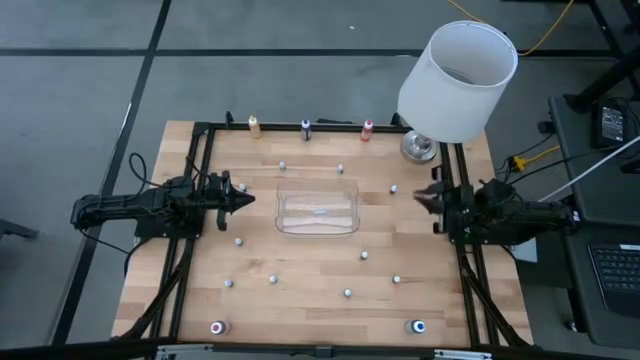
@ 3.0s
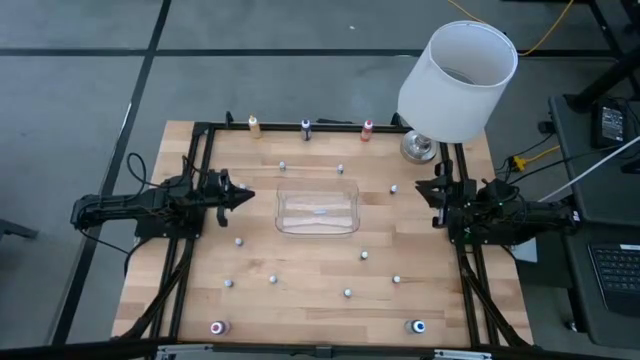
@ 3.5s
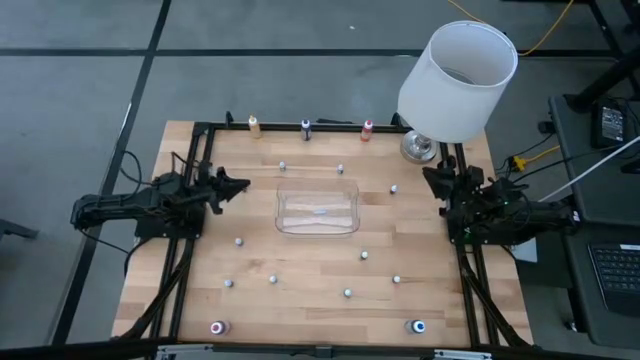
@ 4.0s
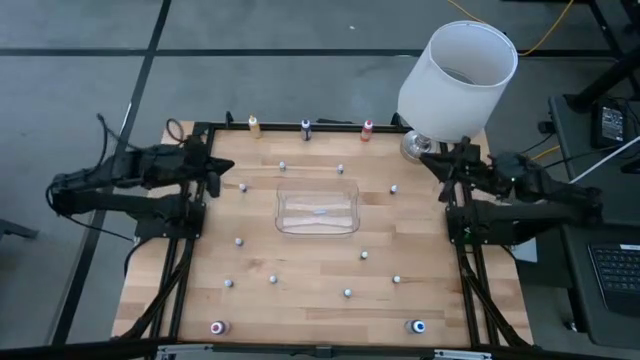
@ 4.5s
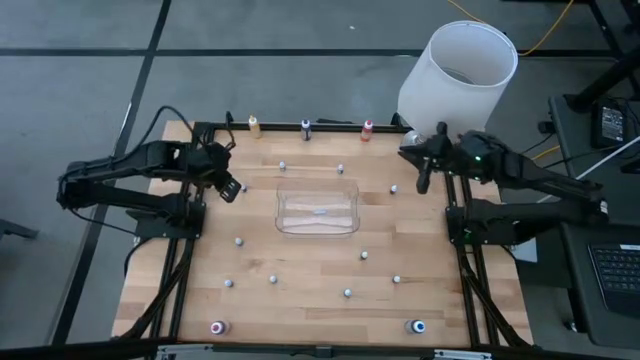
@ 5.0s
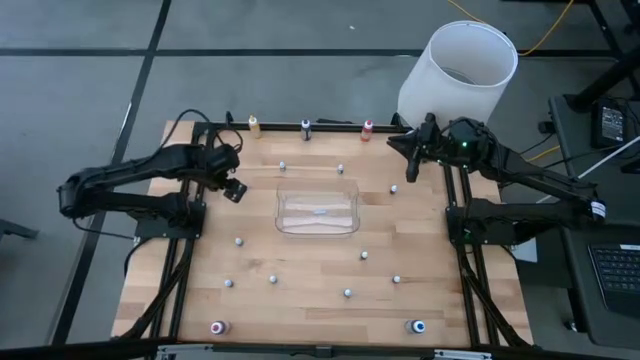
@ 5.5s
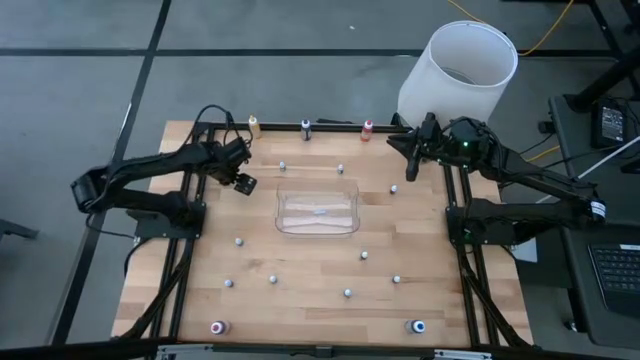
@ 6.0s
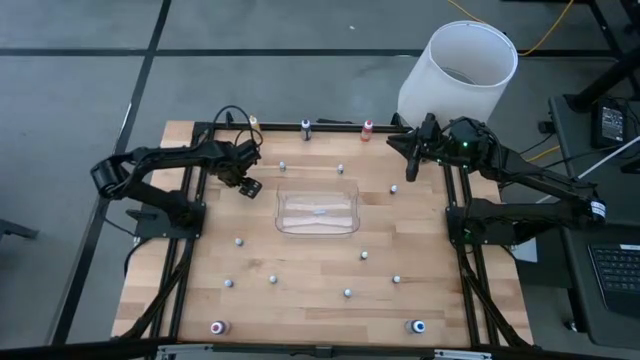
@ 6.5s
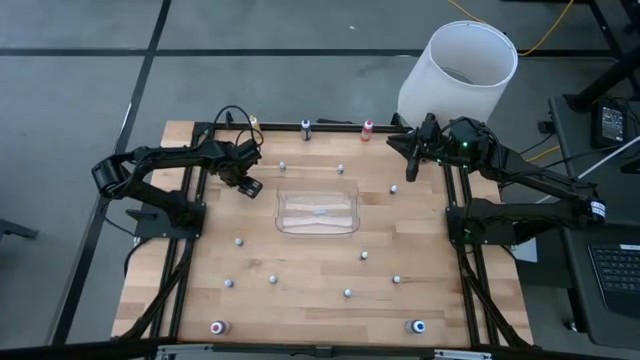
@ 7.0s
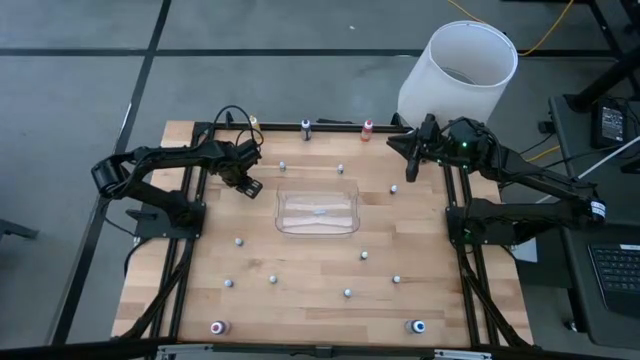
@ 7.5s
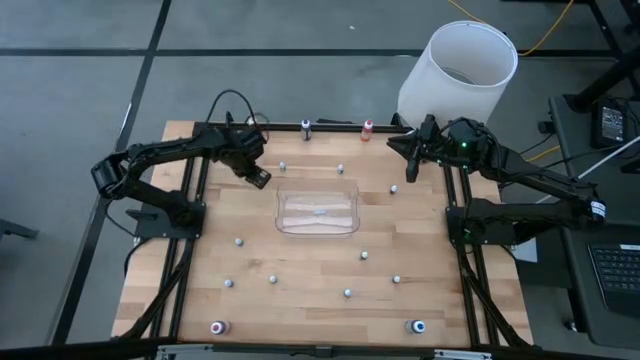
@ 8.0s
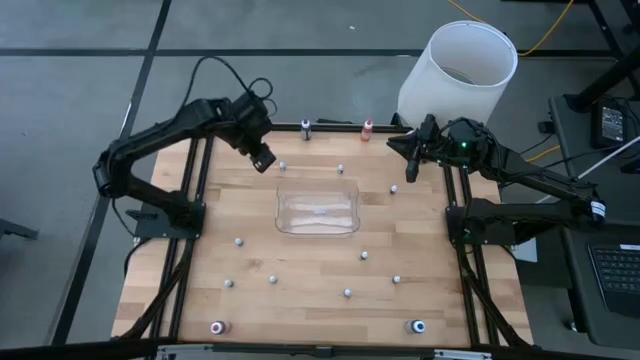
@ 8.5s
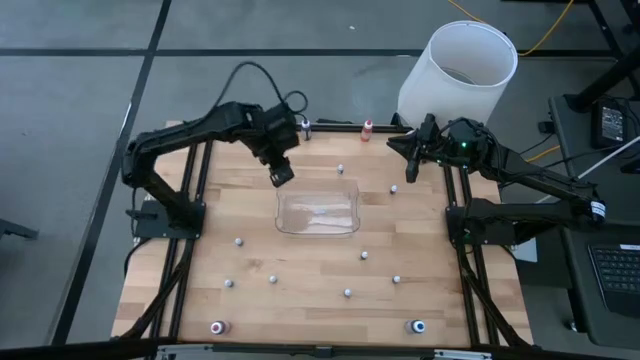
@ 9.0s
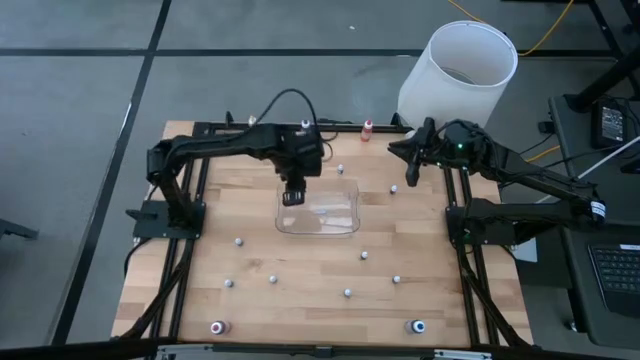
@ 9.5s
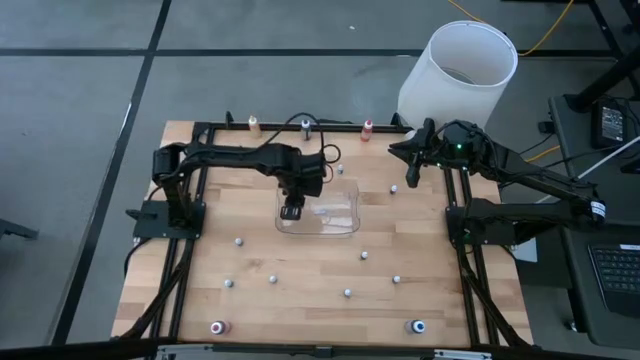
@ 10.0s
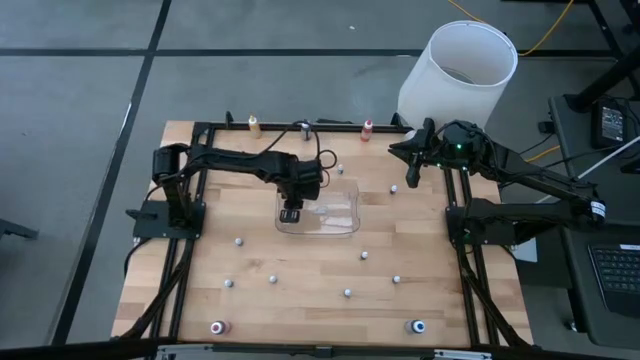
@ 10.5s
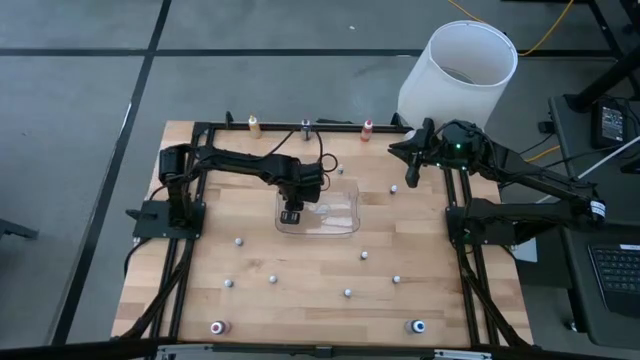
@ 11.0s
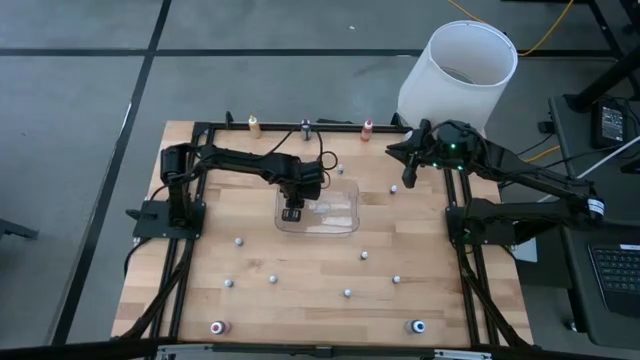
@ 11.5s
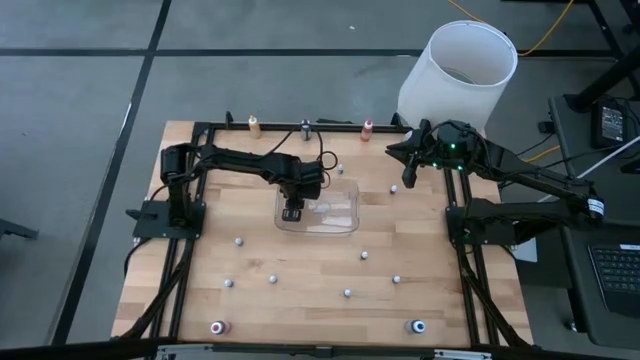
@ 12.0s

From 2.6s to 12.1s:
Task: Pick & Place food coloring
Put the pink food coloring bottle into the transparent bin

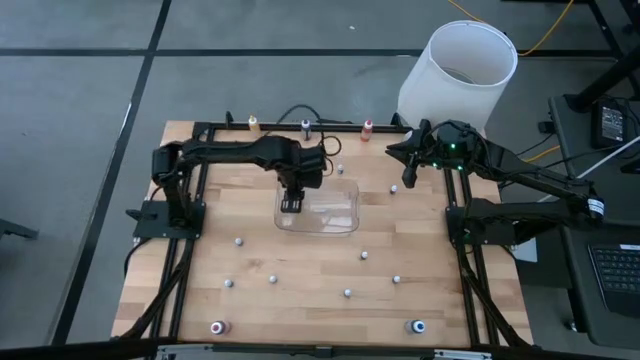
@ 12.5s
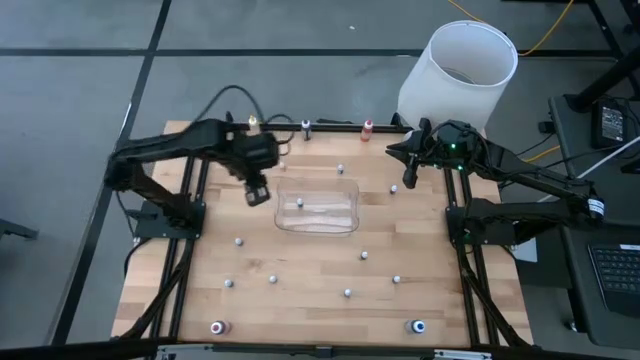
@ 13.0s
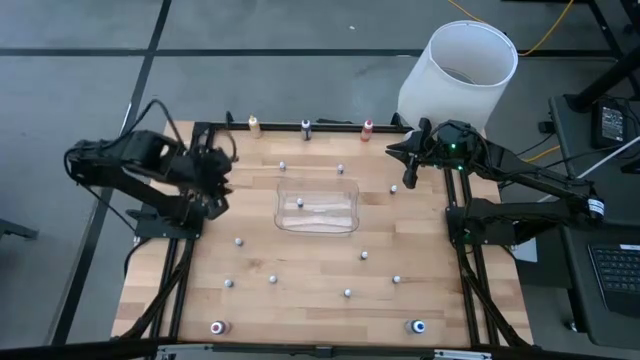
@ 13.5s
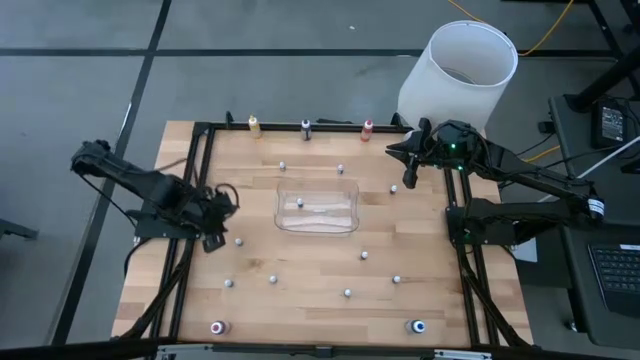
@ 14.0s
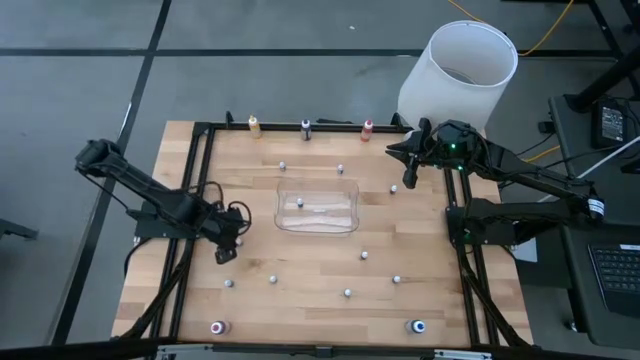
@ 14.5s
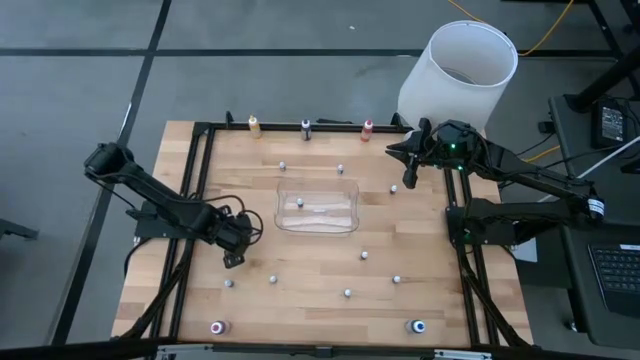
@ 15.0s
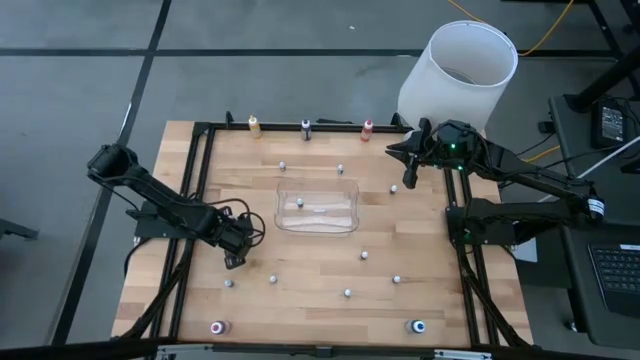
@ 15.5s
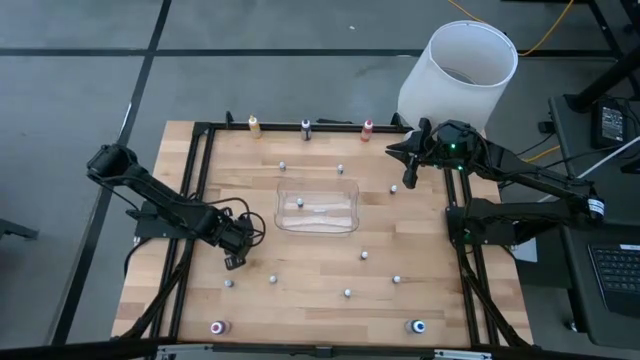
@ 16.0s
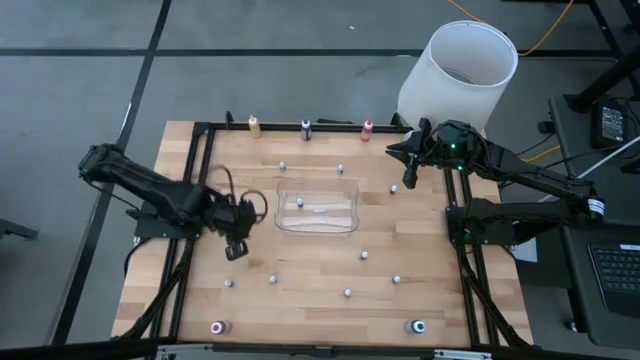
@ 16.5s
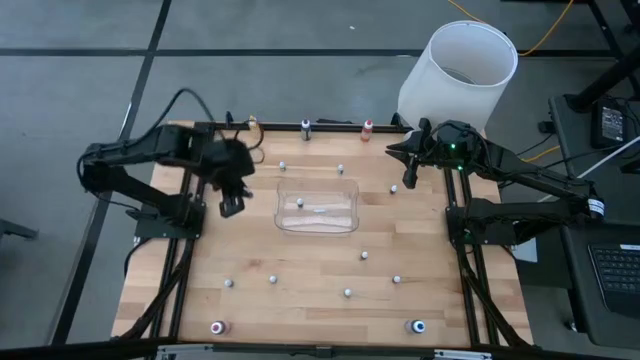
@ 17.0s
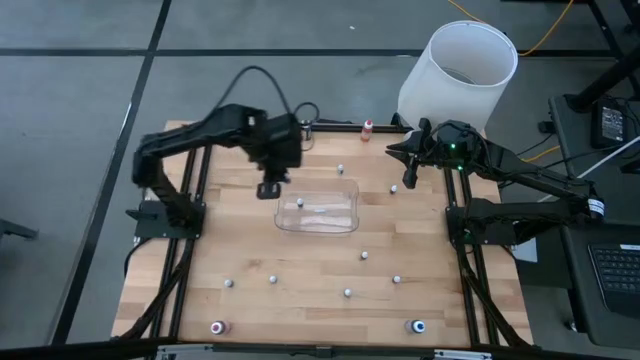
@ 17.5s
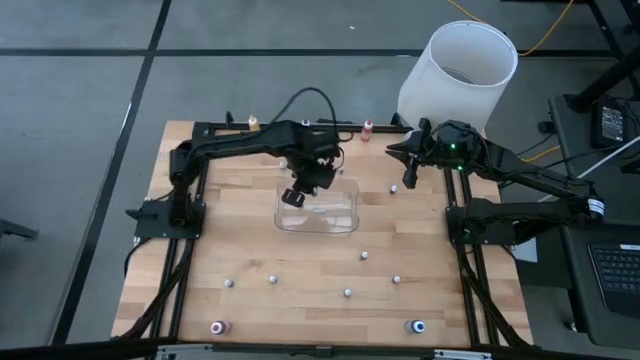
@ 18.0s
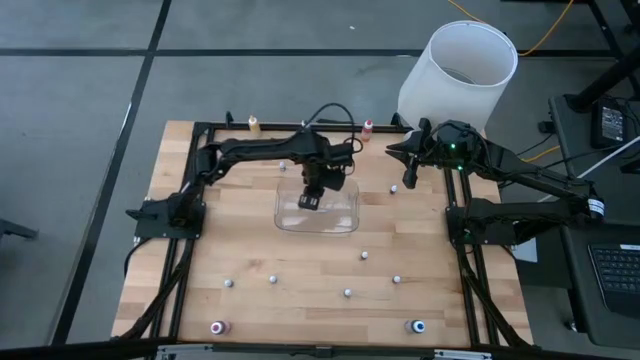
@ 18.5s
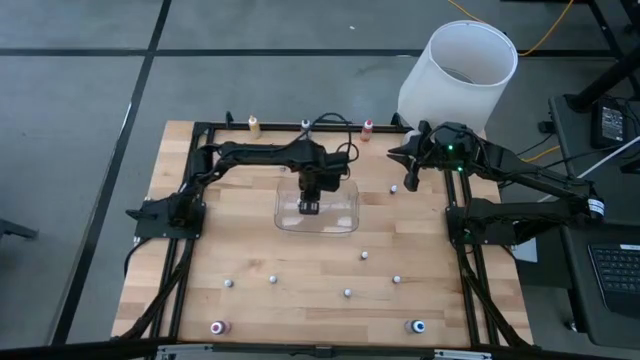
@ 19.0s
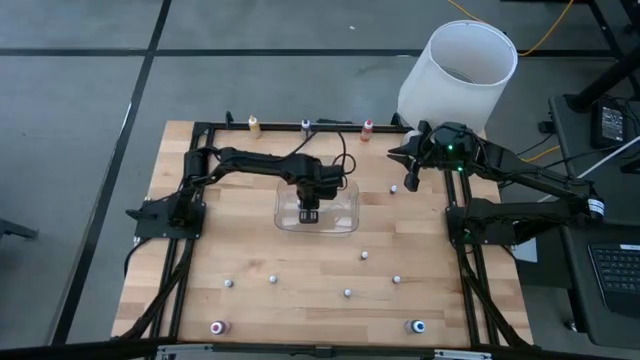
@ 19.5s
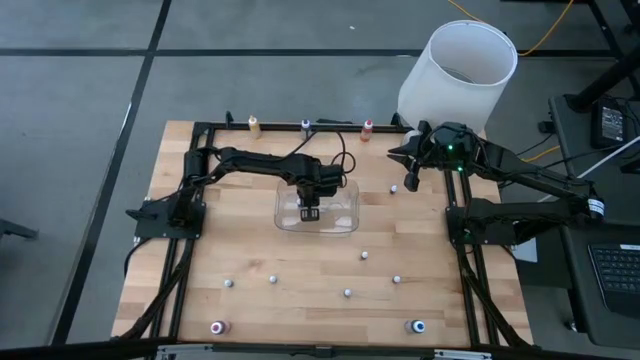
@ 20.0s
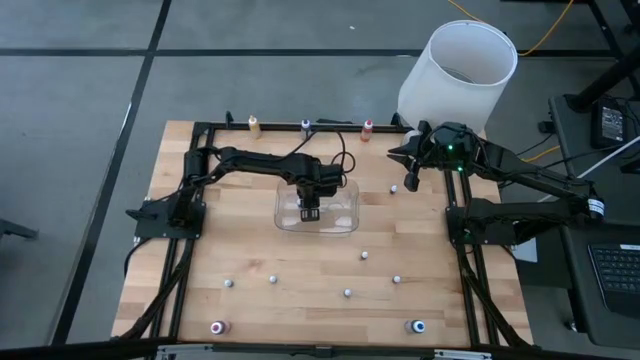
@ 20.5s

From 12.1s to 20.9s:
Put the blue food coloring bottle into the transparent bin

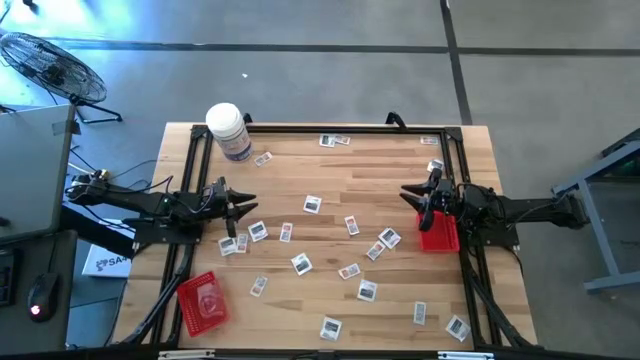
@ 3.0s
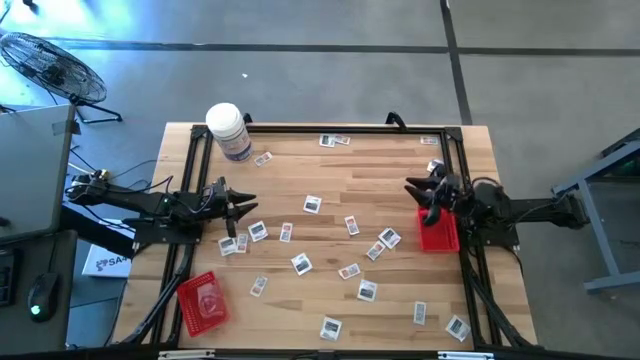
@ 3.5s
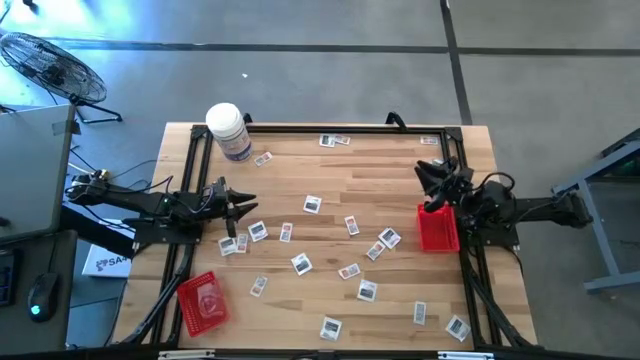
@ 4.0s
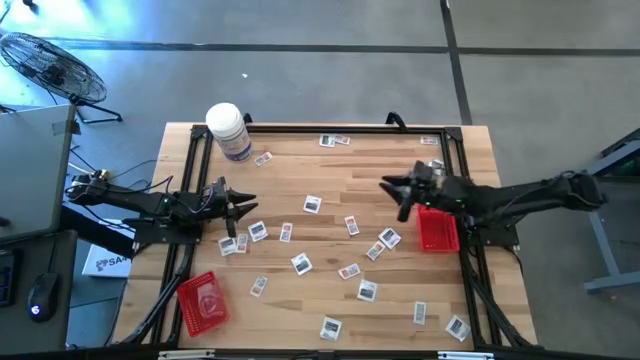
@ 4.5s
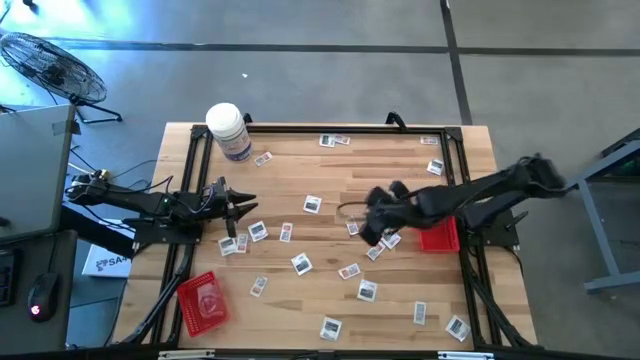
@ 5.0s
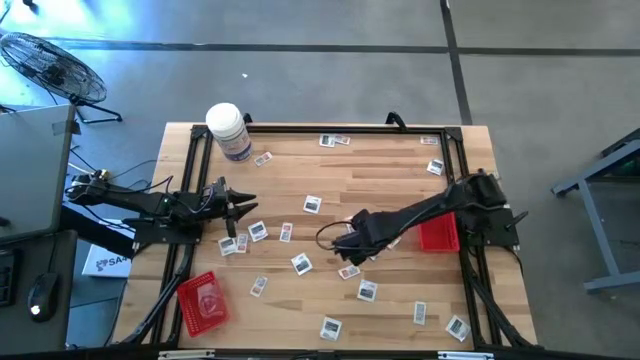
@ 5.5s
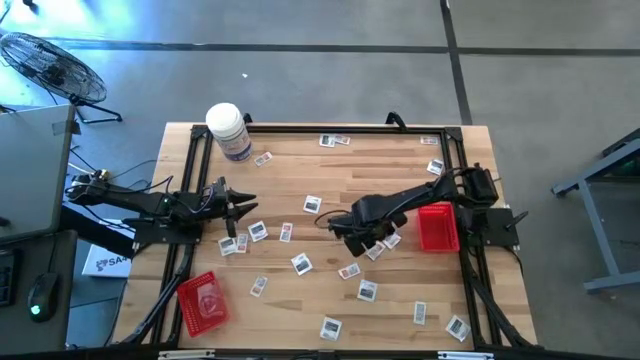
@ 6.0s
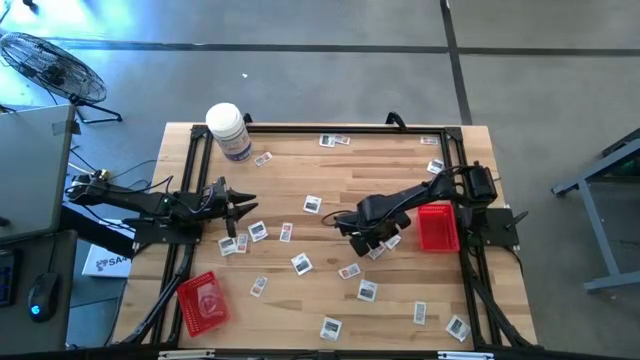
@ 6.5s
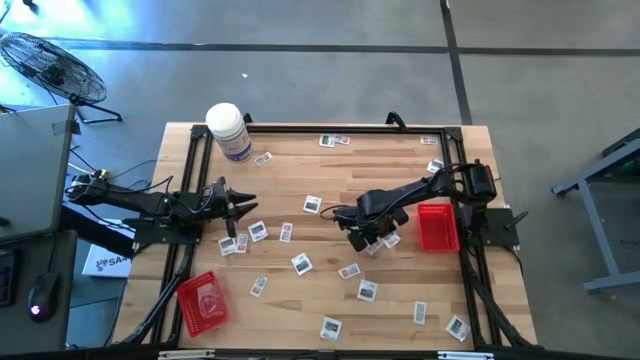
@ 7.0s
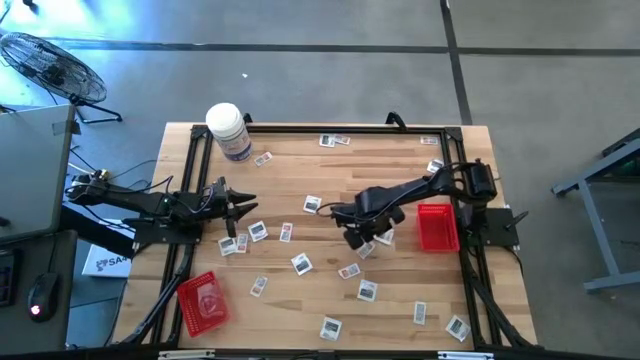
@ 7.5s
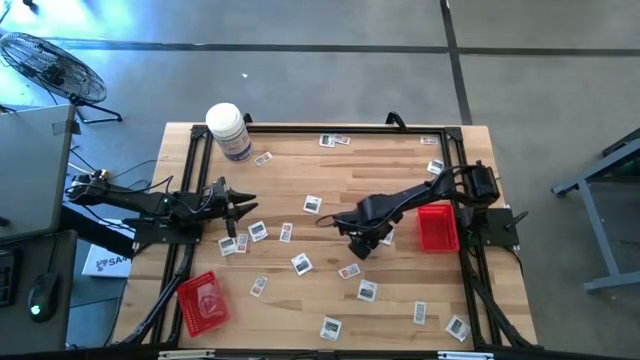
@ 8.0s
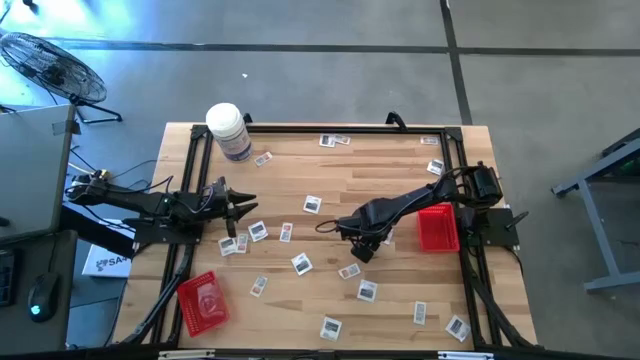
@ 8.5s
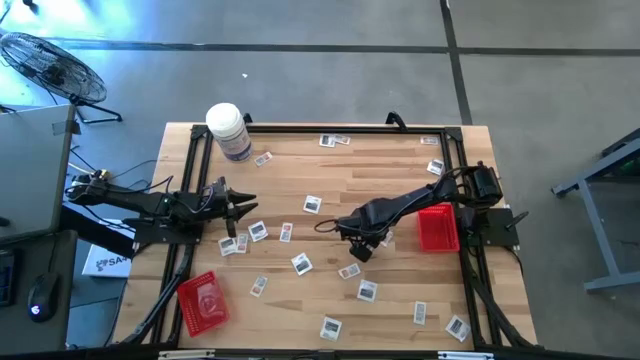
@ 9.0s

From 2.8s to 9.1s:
Task: Pick & Place First Aid Supplies
Put the towelette pack into the right red bin
